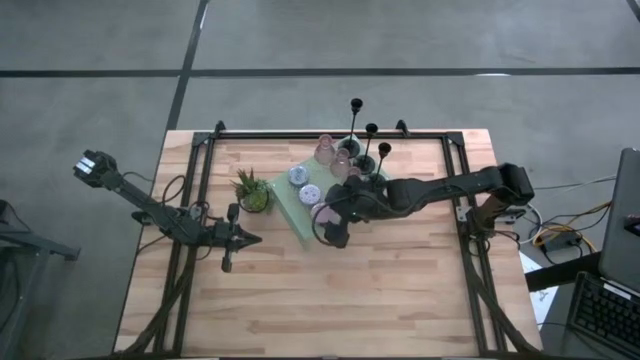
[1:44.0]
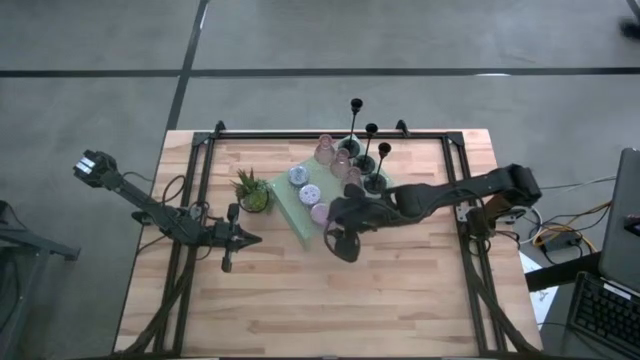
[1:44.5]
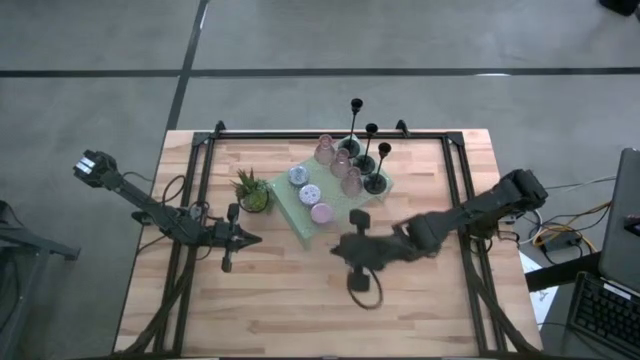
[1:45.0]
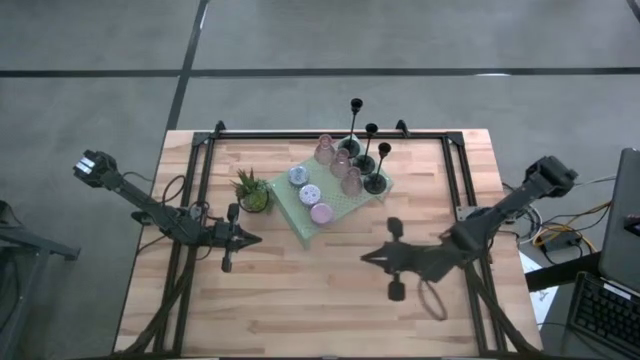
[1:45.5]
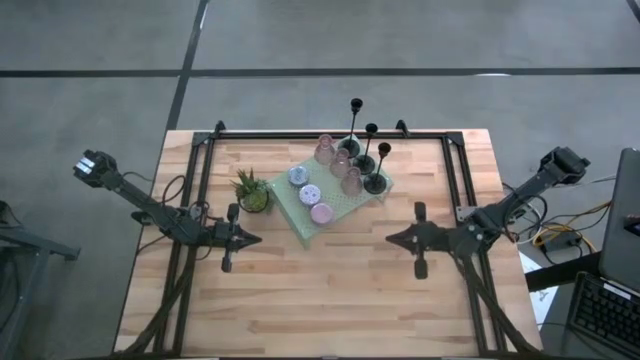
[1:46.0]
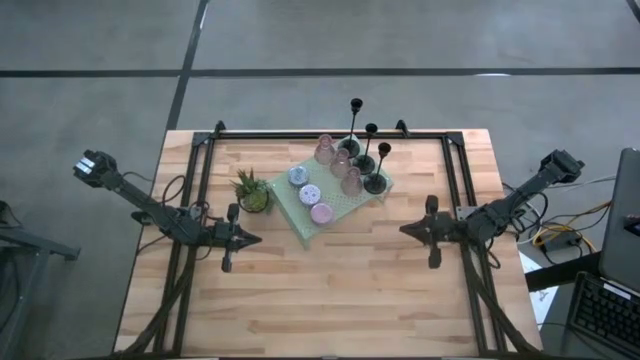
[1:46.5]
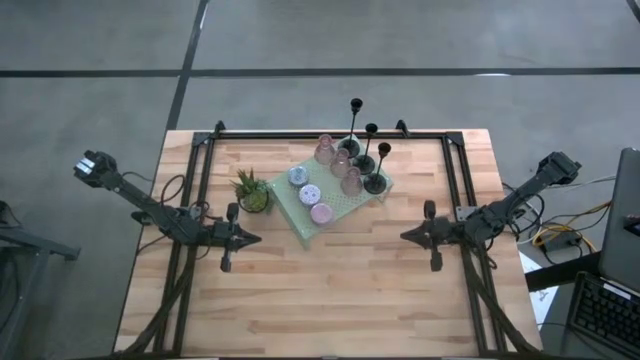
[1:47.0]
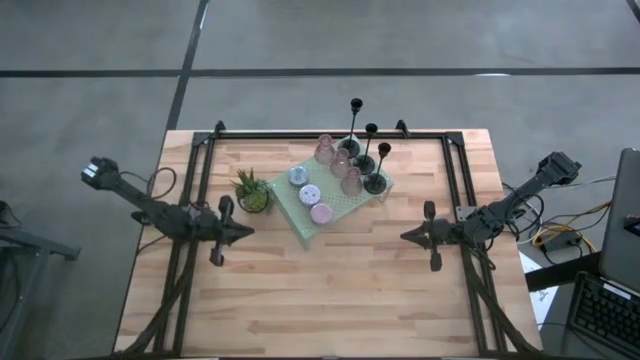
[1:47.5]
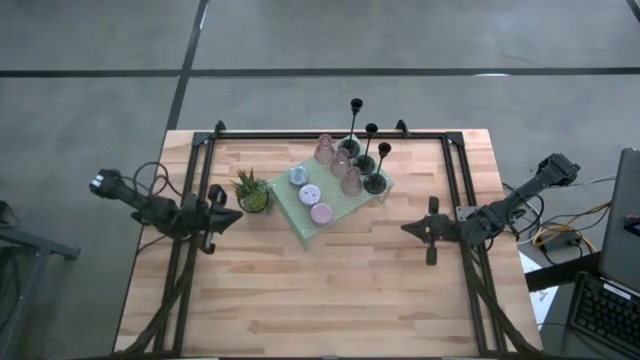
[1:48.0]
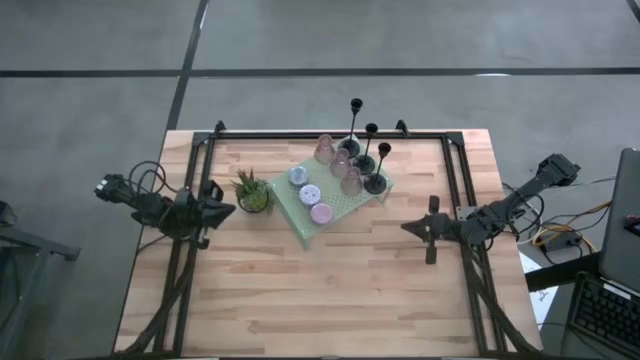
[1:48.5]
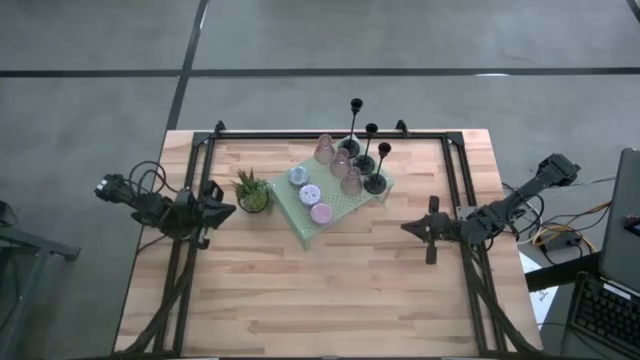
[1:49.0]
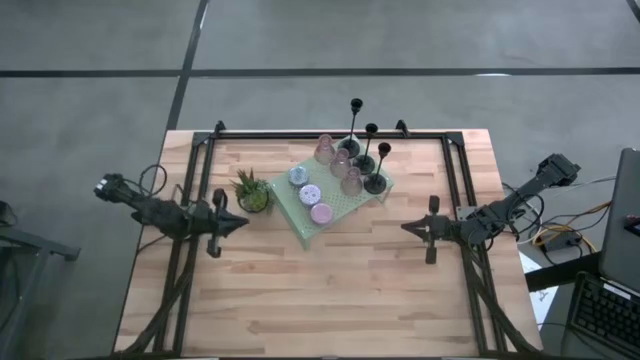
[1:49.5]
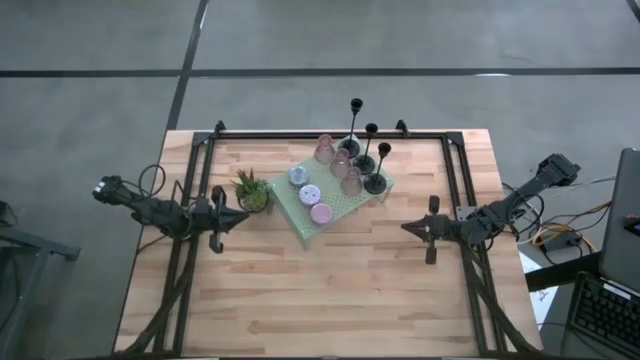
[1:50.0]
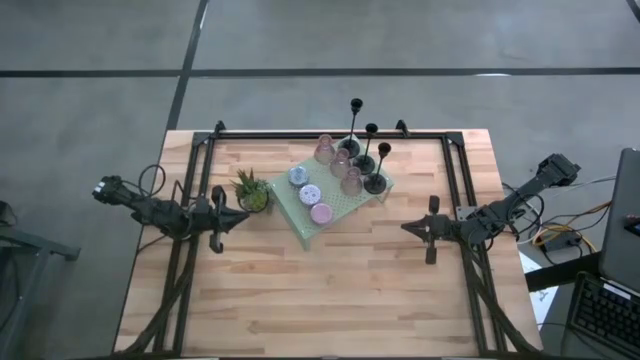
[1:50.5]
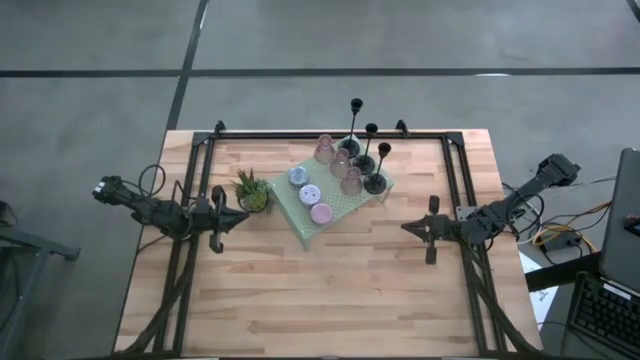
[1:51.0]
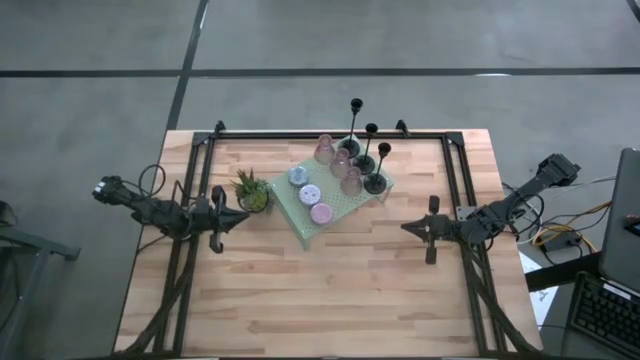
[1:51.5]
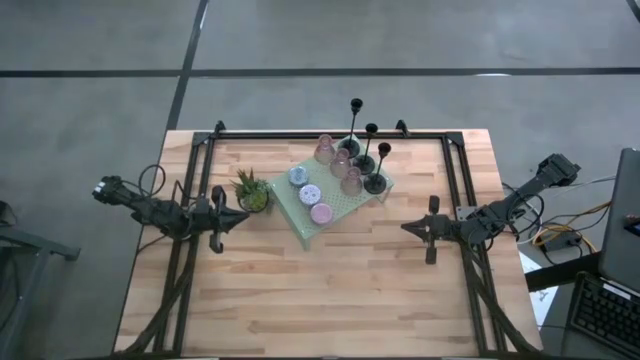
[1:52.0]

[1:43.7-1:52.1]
Task: Pick & Place candle stick holders
Return to Home Position

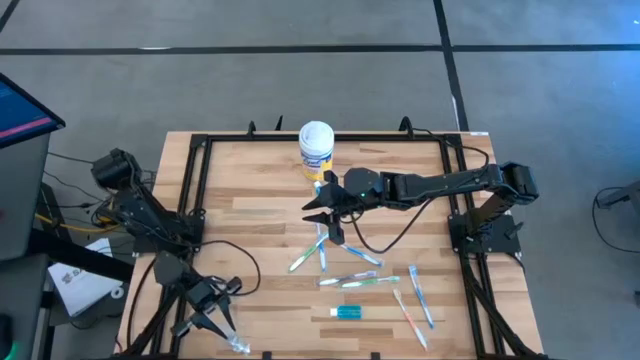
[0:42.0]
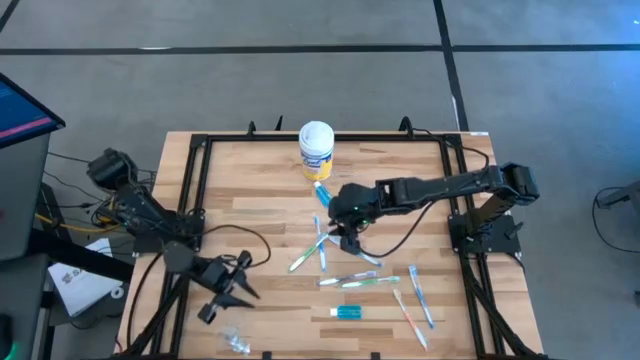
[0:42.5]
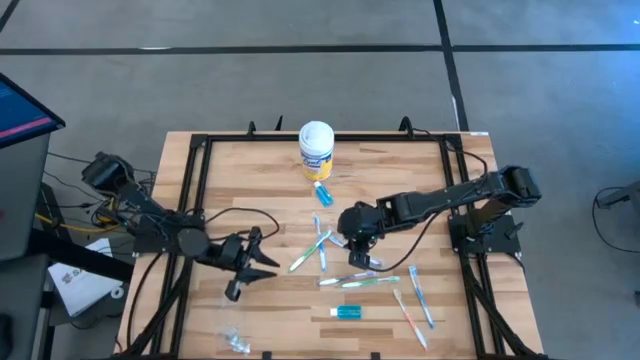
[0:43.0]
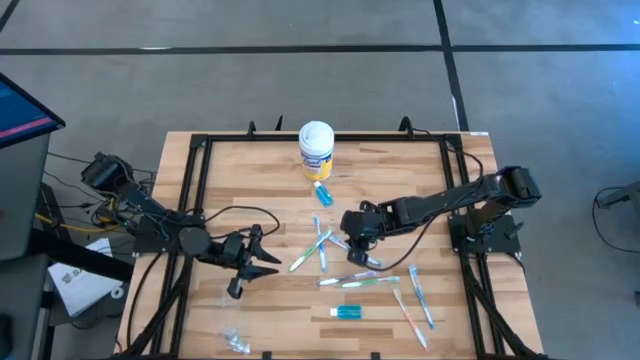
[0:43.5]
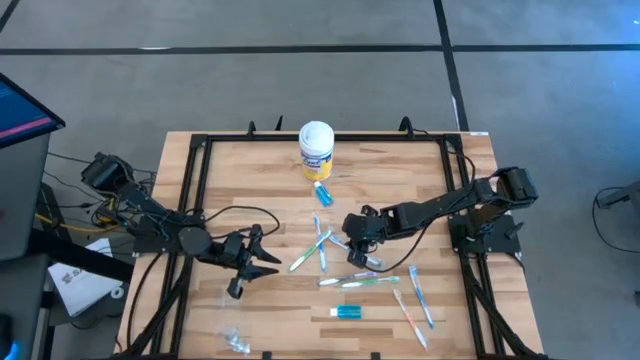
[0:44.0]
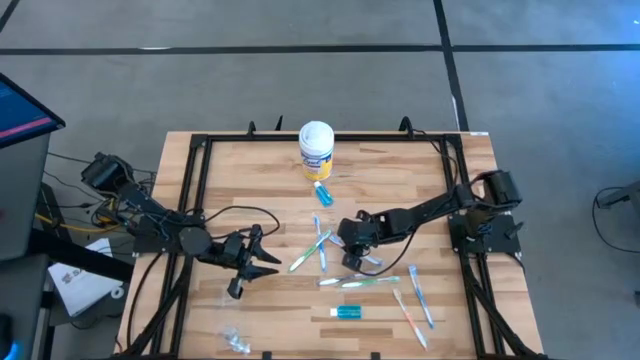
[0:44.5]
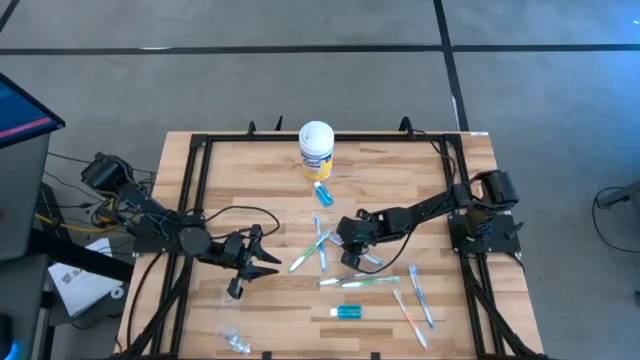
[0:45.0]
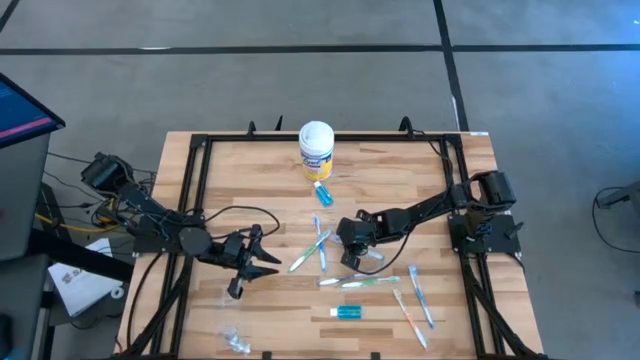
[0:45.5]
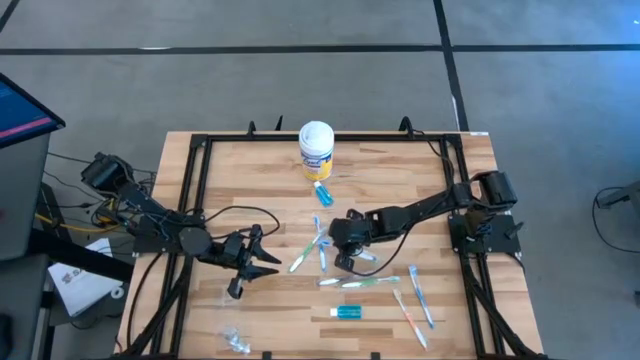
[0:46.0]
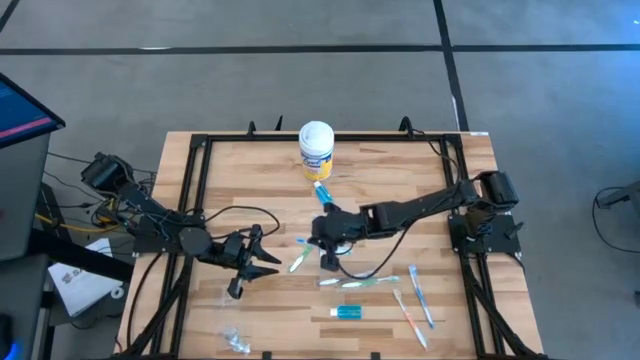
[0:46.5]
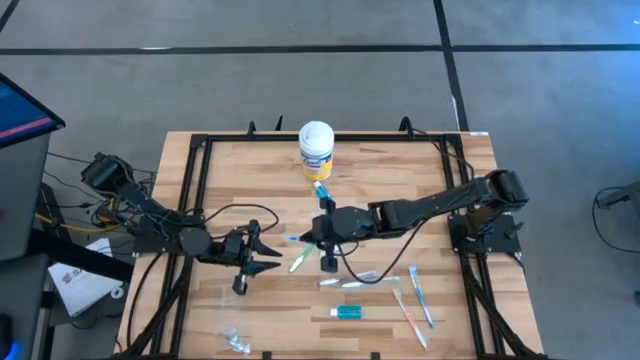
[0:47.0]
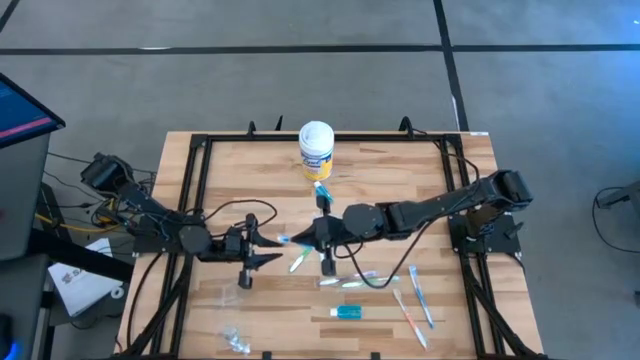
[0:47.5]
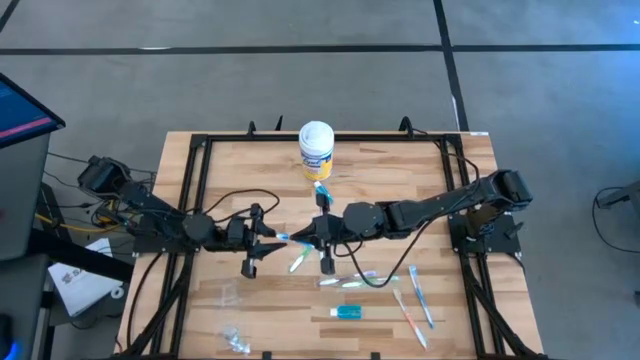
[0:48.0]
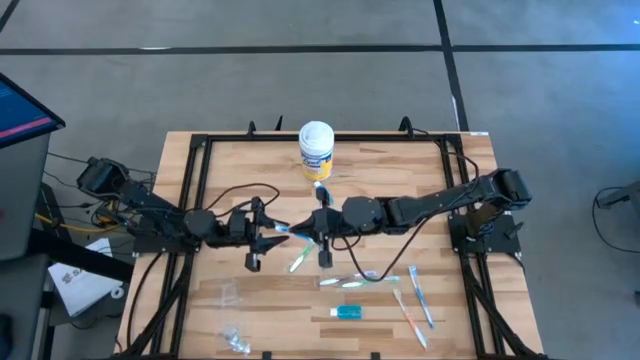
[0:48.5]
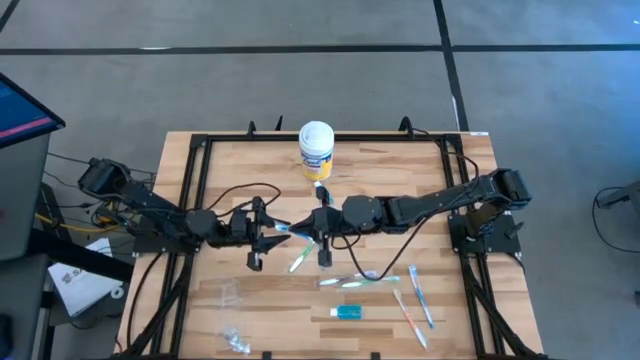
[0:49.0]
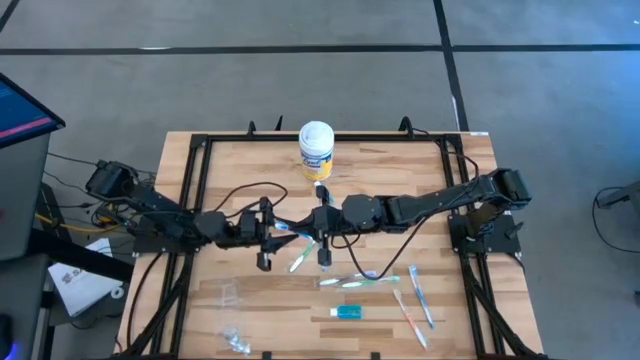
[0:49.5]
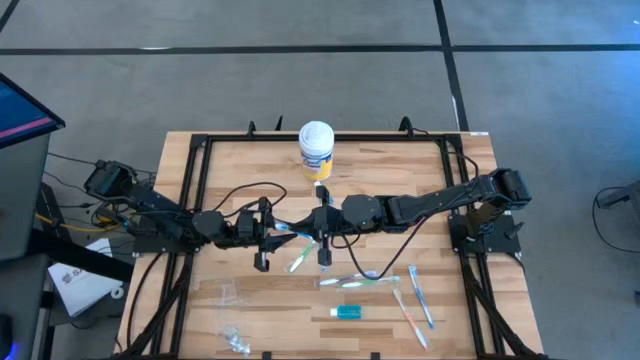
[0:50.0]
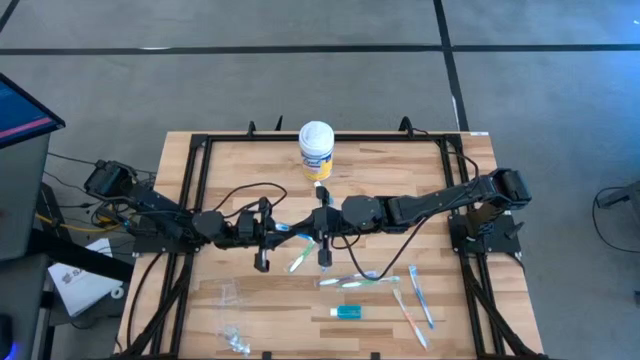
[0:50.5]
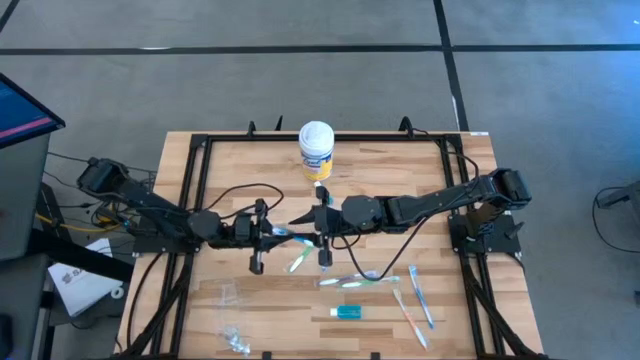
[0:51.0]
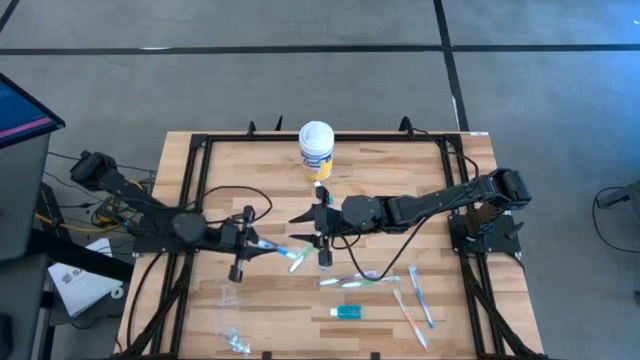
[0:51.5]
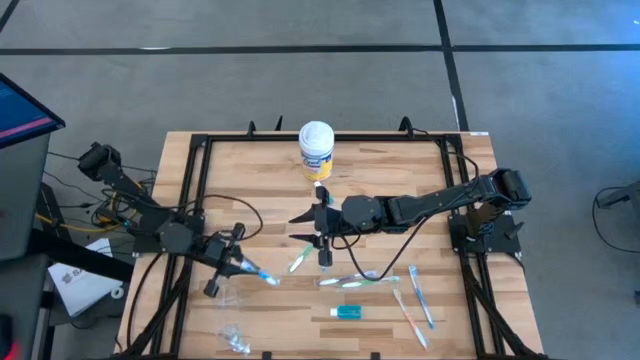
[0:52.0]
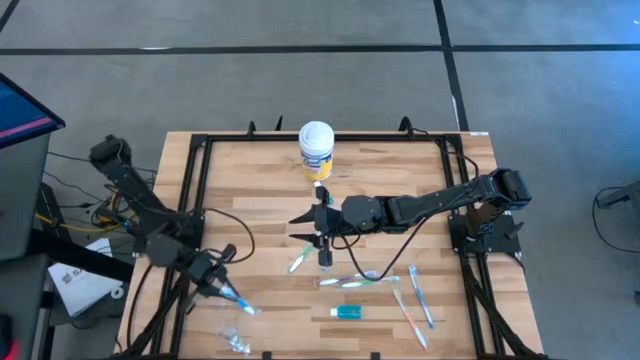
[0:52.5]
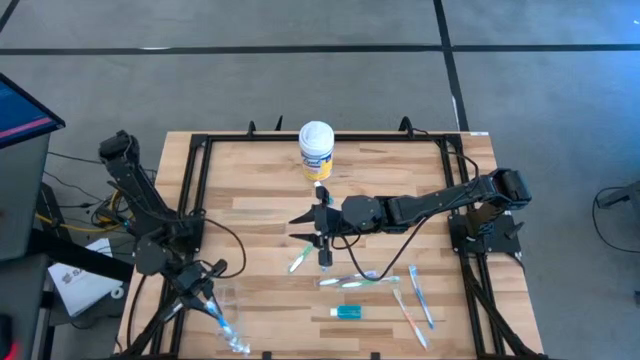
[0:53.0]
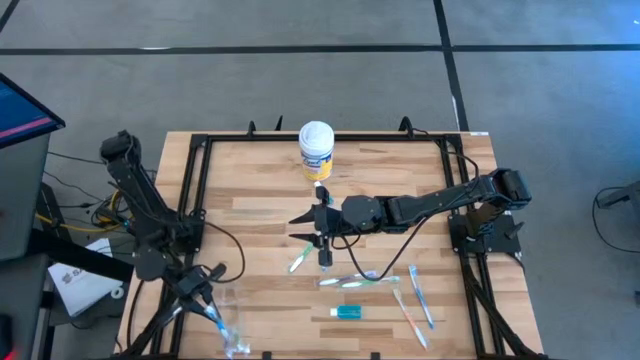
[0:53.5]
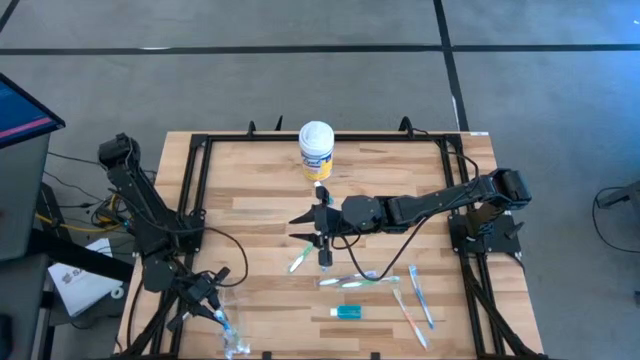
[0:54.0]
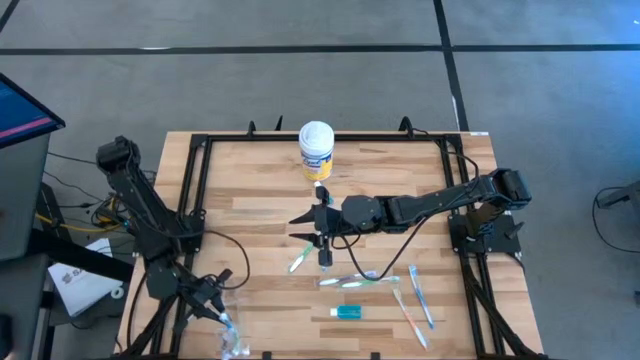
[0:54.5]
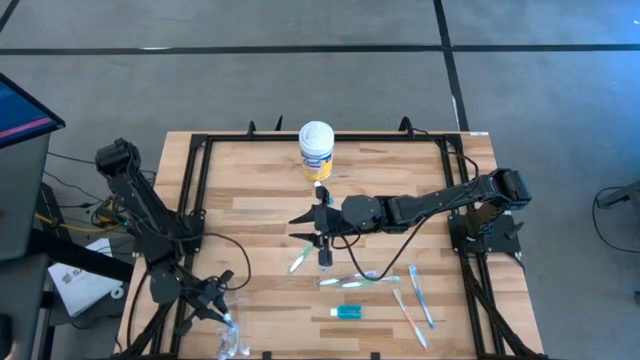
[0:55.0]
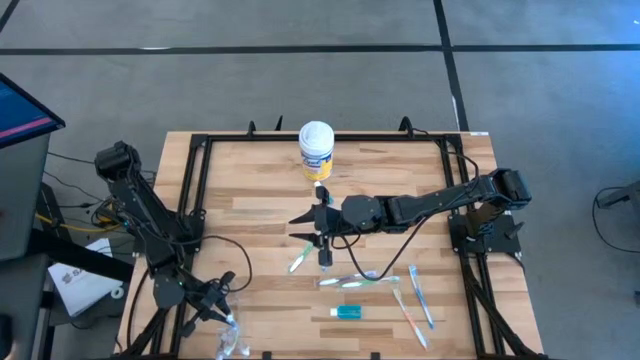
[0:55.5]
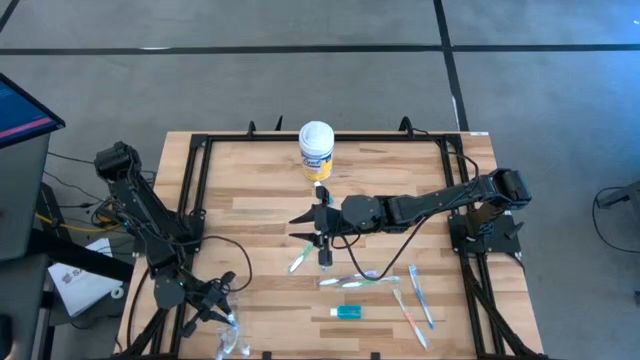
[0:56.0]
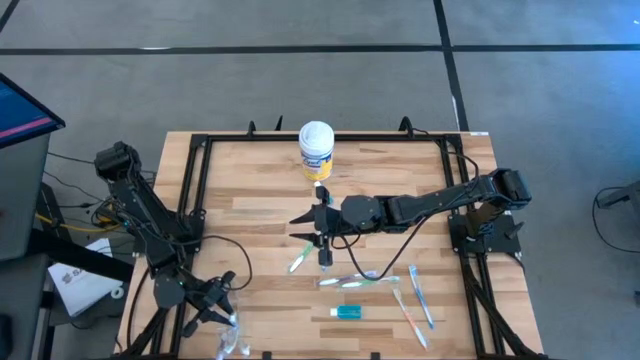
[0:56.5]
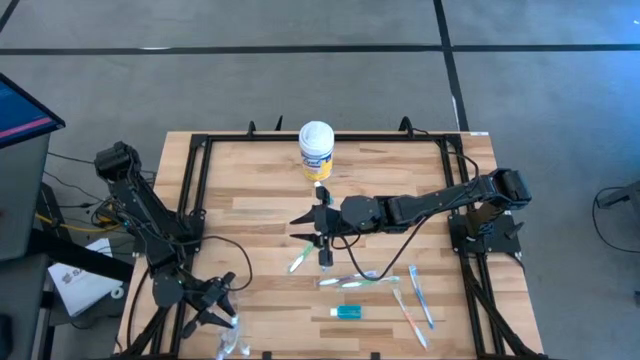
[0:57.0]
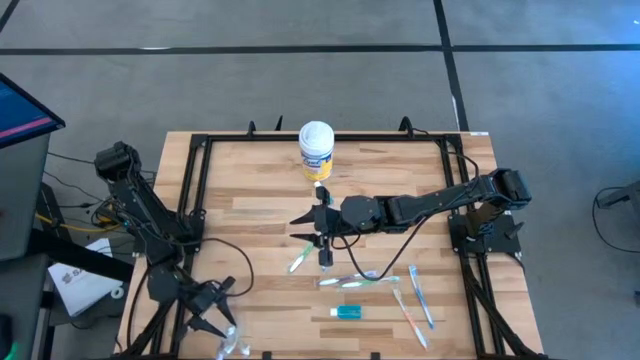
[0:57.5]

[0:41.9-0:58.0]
Task: Pick & Place toothbrushing station
Put the middle blue toothbrush into the transparent organizer
